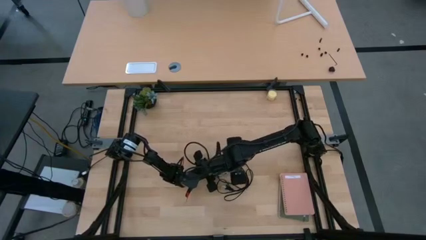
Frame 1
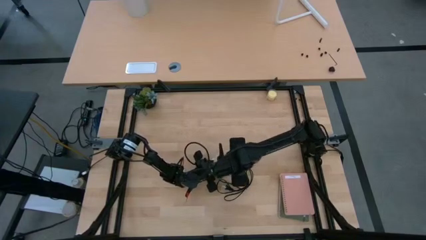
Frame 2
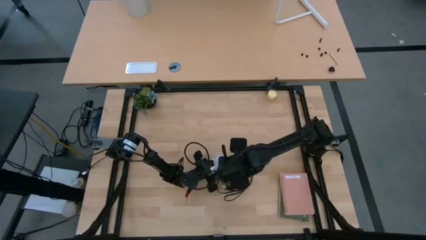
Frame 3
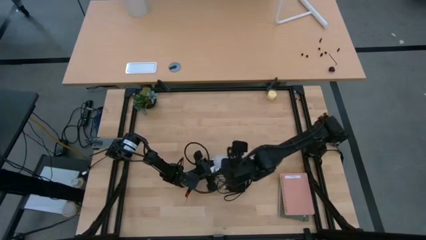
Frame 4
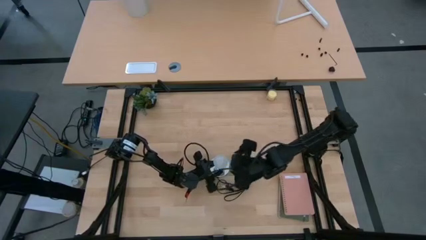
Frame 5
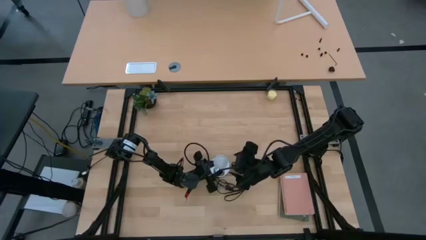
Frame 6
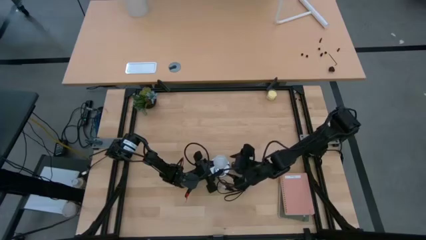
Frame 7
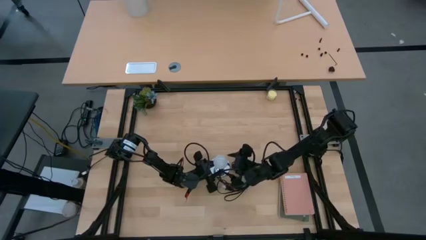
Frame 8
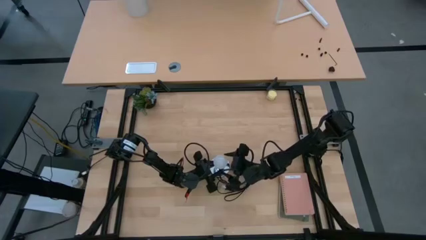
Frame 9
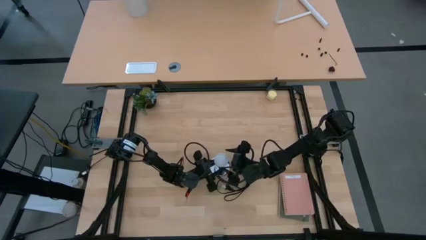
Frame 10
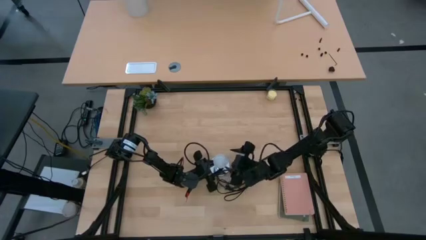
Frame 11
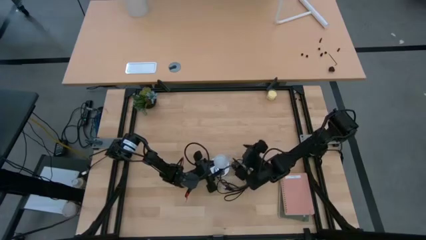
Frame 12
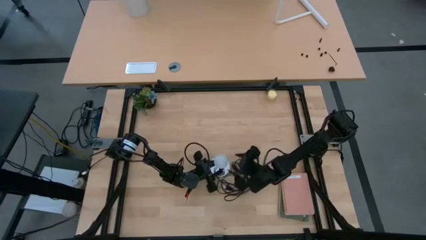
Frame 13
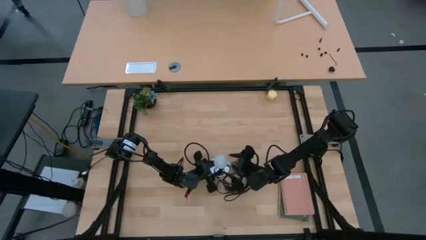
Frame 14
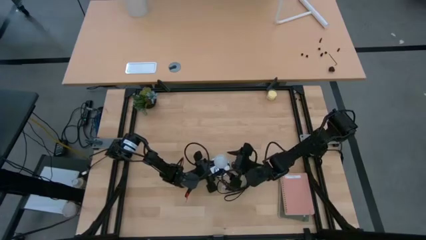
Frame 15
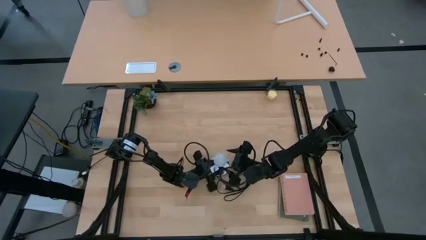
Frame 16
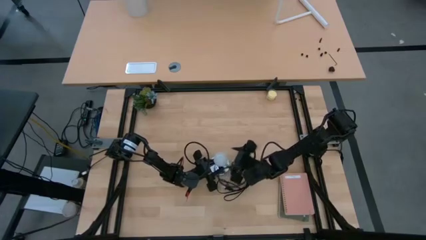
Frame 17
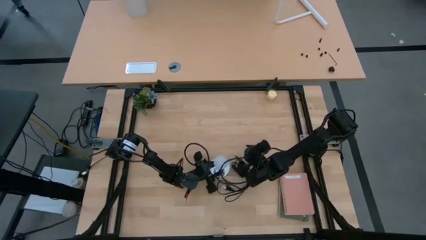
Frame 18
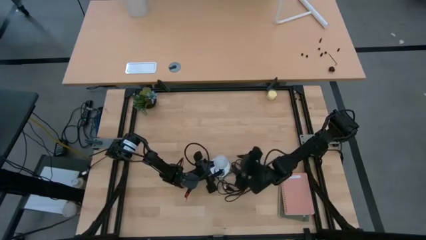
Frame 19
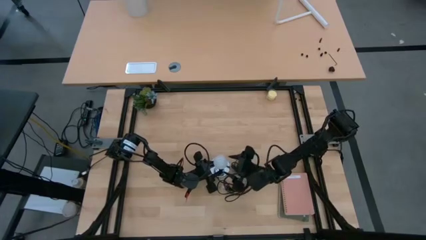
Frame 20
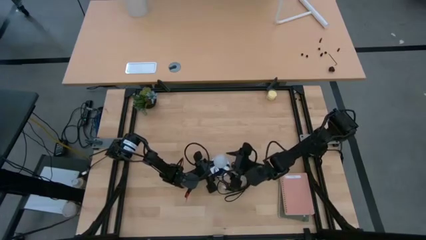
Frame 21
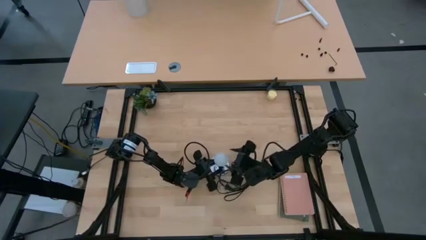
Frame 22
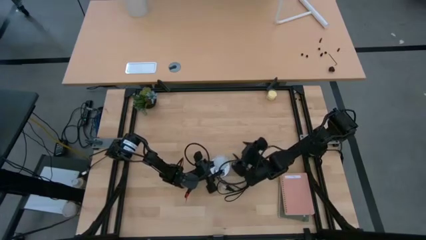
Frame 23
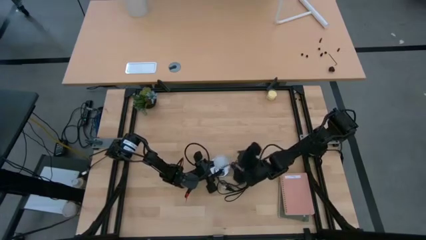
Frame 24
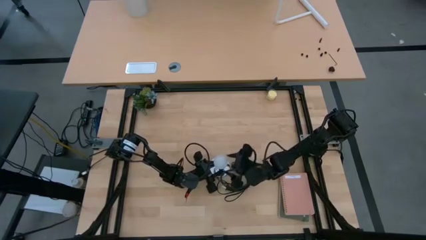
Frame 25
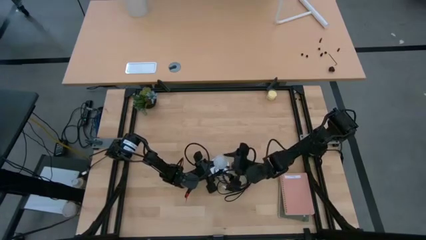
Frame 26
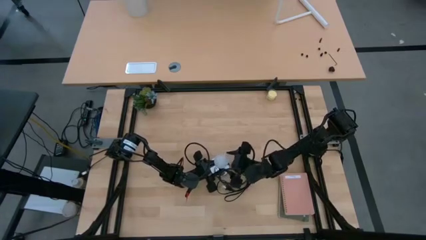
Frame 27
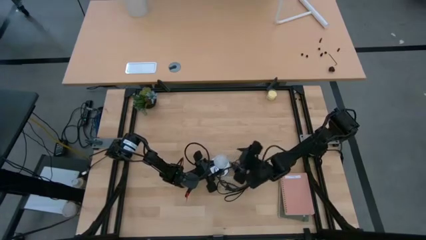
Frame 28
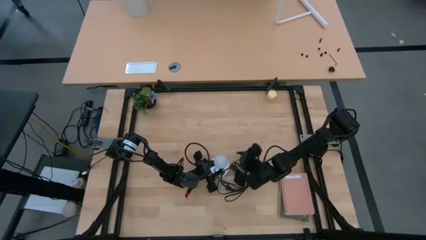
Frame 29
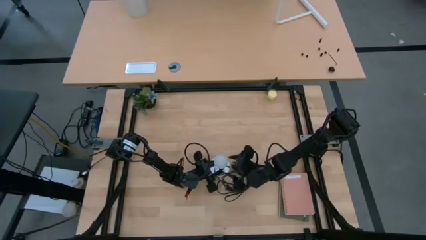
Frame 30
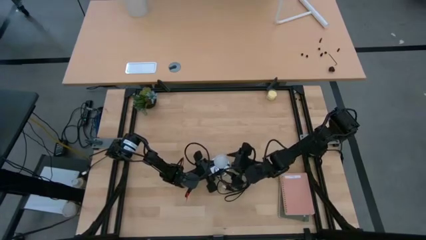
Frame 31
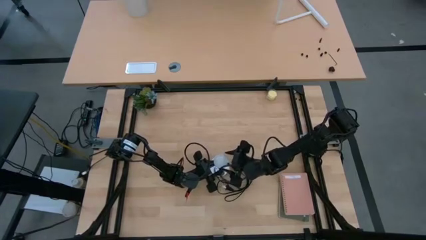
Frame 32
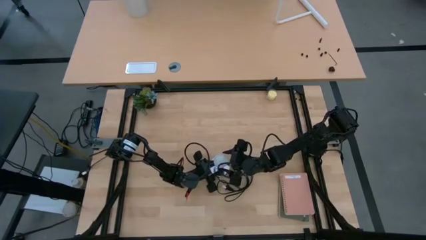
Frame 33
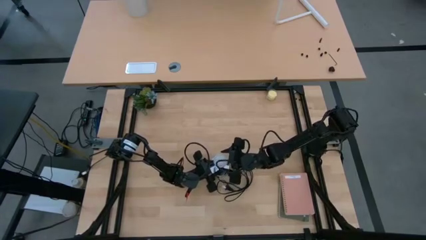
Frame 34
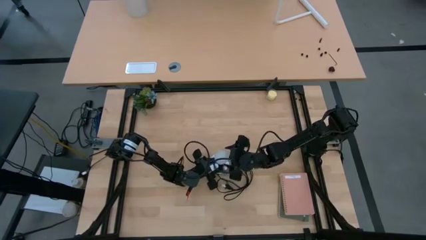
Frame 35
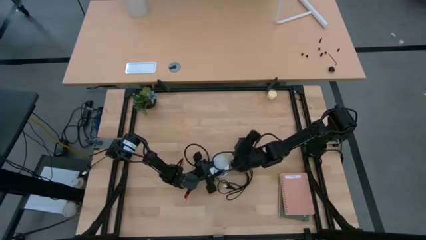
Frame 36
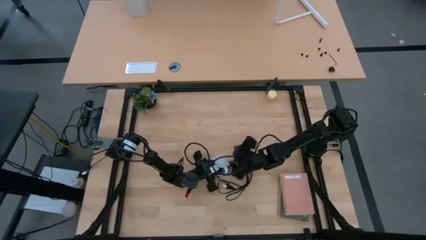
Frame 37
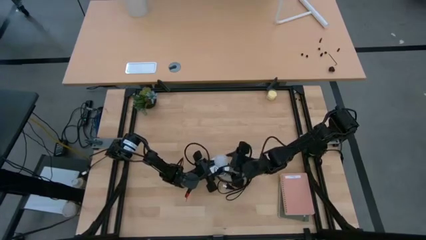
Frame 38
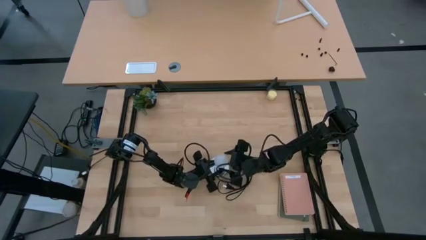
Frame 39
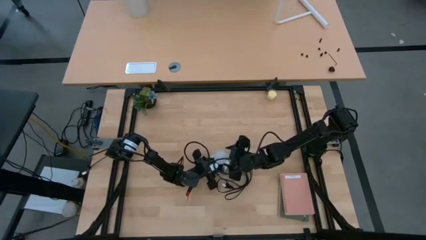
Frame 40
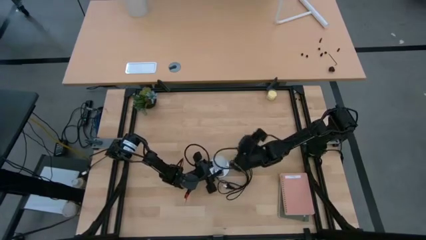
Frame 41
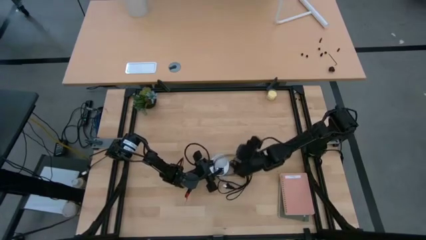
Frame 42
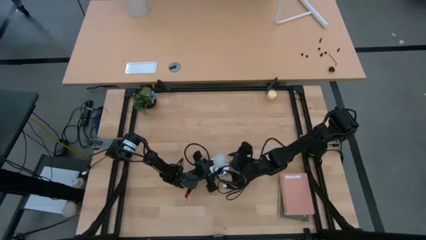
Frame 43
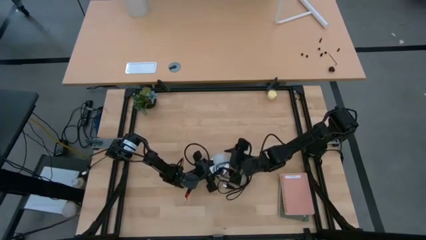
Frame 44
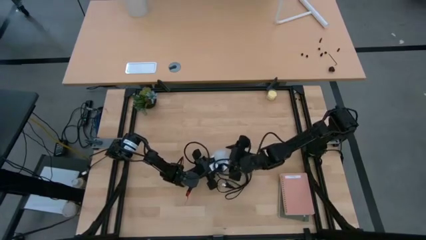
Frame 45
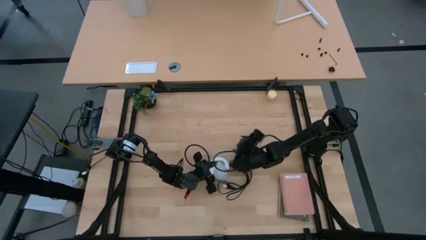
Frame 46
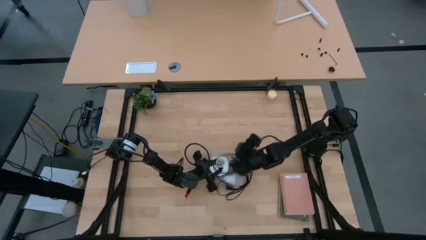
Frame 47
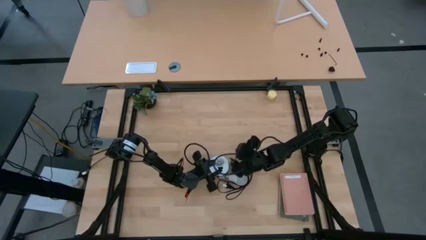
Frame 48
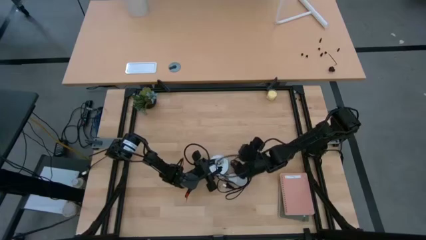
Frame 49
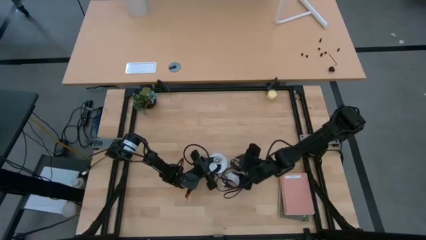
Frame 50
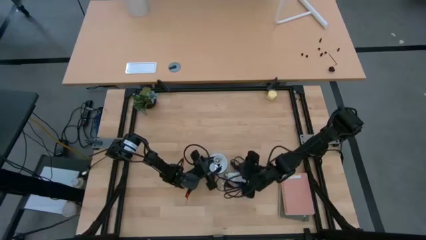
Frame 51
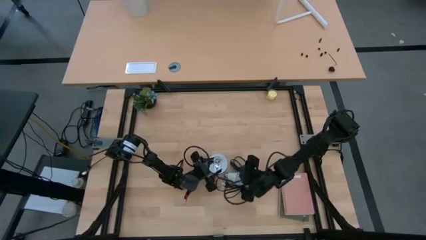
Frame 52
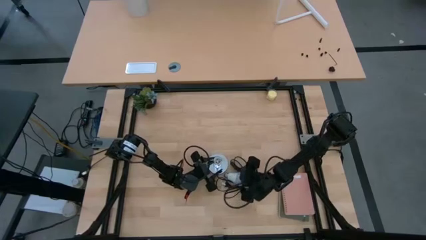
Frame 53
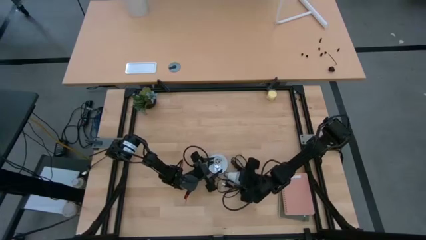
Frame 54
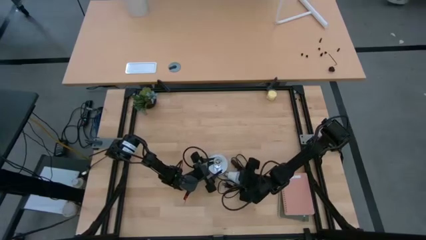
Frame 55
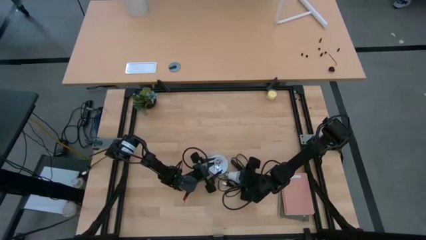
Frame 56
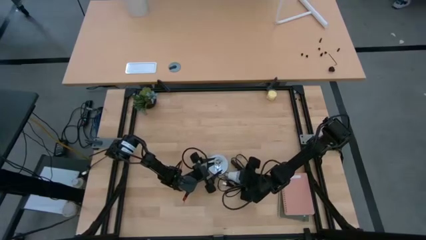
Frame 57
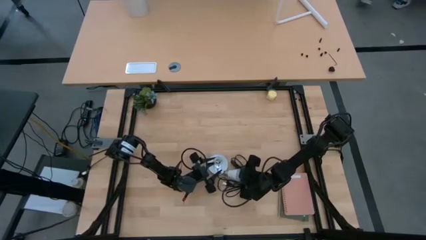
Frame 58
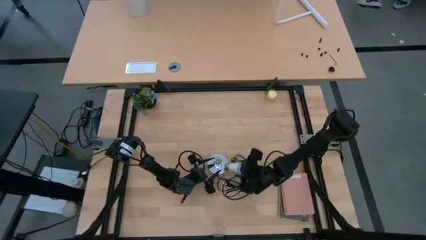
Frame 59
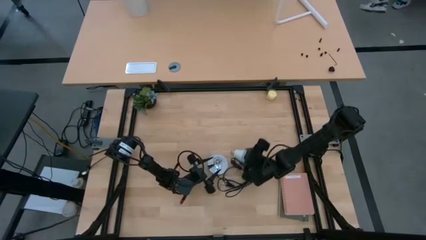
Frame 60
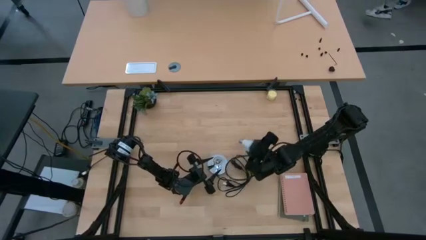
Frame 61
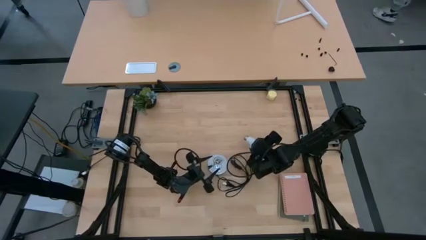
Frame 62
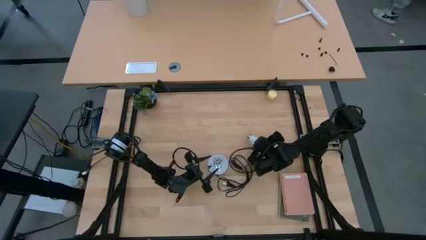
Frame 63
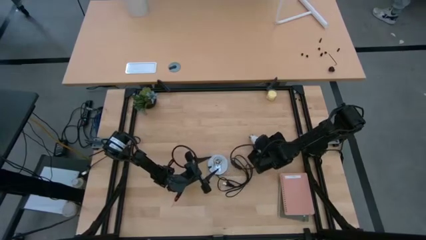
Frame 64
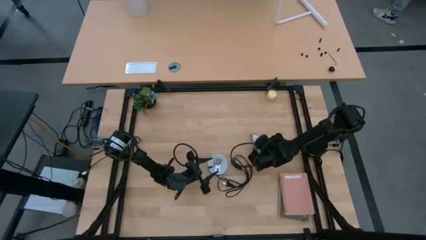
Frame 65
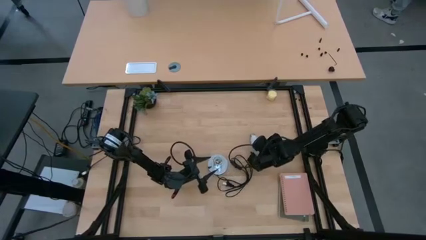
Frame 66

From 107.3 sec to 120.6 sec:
Task: Screw lightbulb
Remove the white lightbulb from the silver lamp
